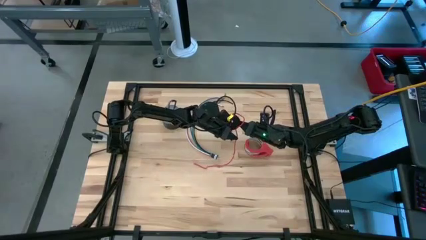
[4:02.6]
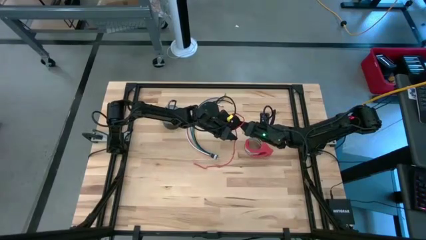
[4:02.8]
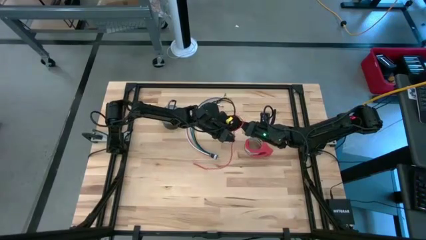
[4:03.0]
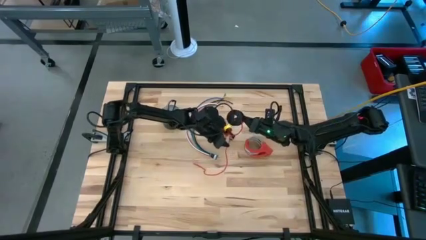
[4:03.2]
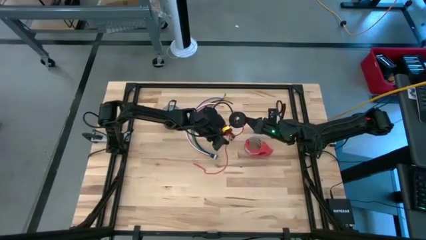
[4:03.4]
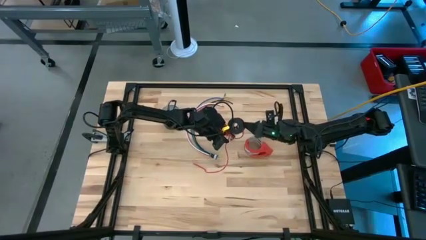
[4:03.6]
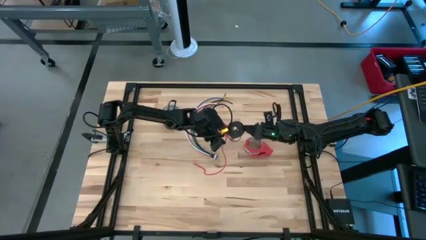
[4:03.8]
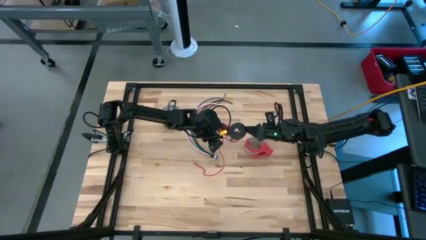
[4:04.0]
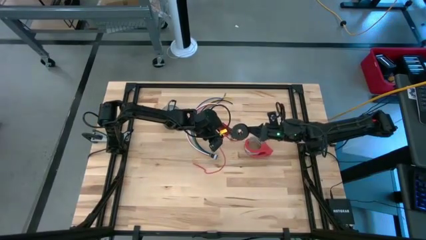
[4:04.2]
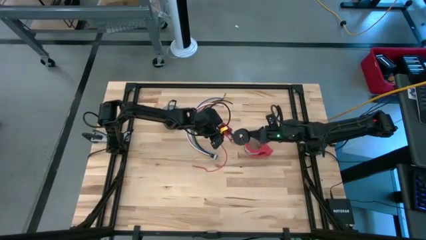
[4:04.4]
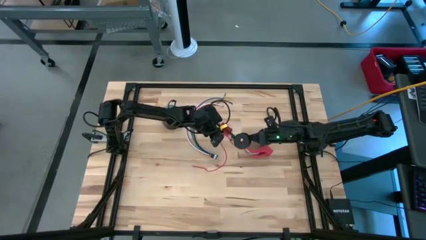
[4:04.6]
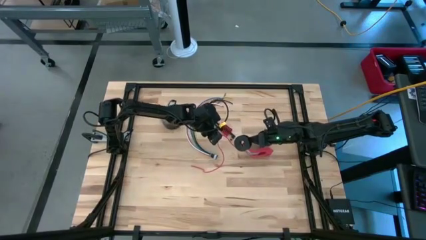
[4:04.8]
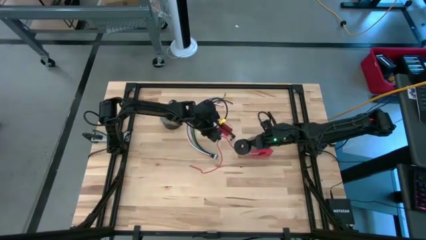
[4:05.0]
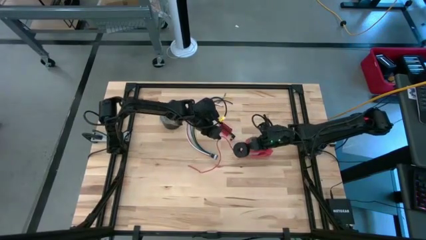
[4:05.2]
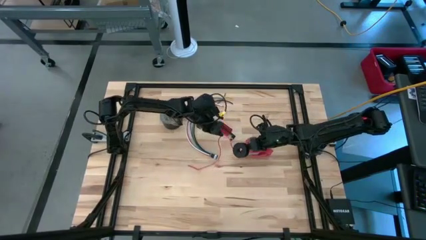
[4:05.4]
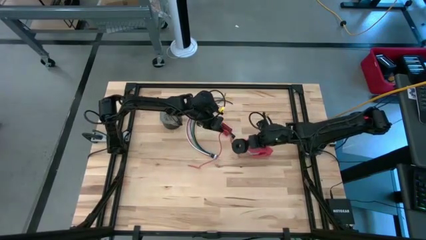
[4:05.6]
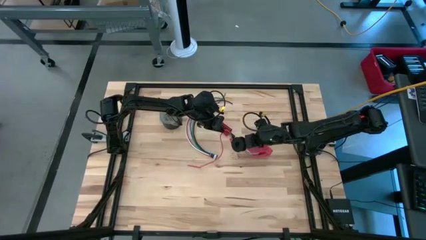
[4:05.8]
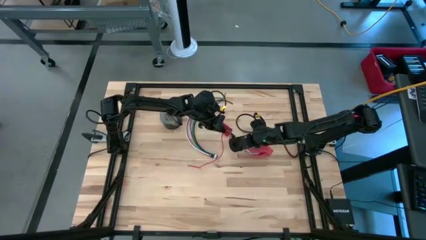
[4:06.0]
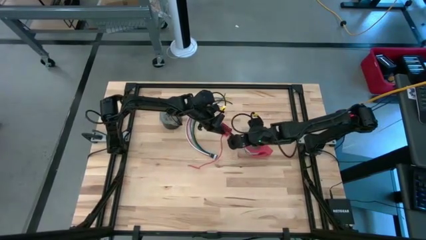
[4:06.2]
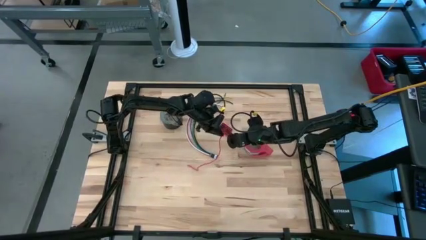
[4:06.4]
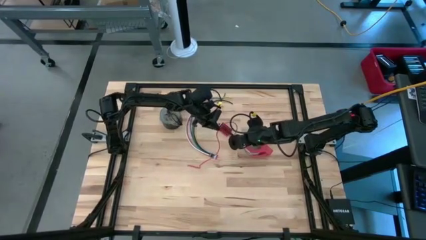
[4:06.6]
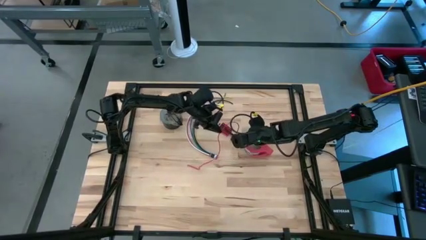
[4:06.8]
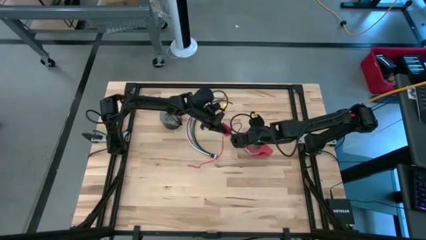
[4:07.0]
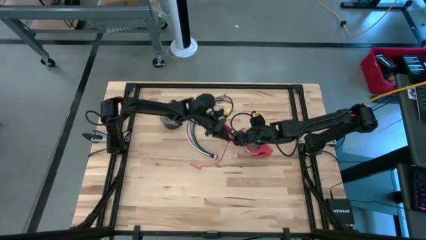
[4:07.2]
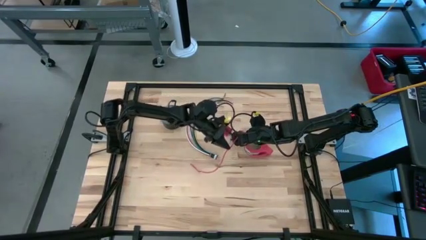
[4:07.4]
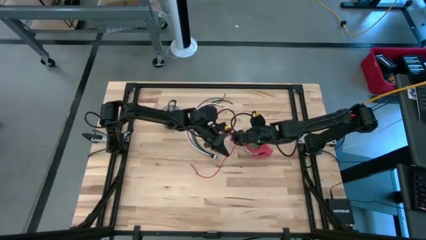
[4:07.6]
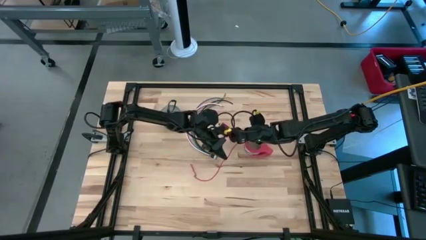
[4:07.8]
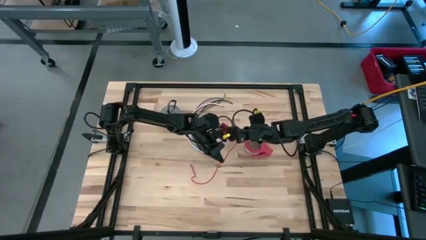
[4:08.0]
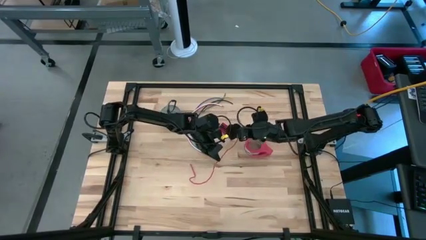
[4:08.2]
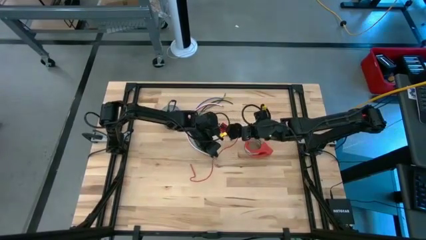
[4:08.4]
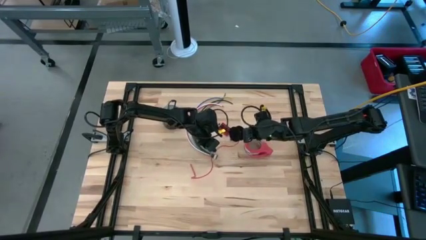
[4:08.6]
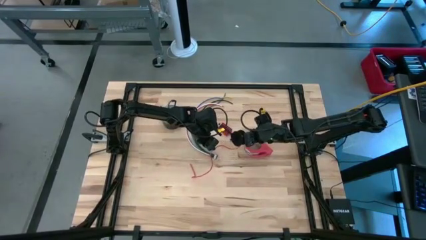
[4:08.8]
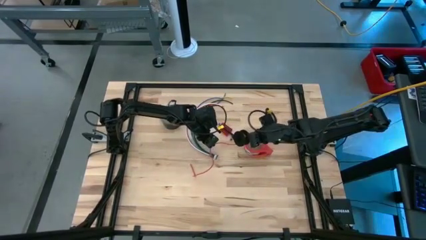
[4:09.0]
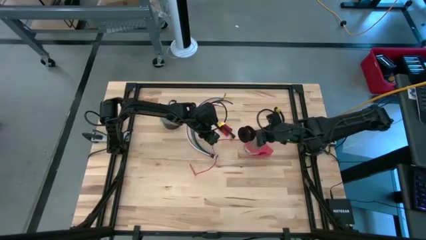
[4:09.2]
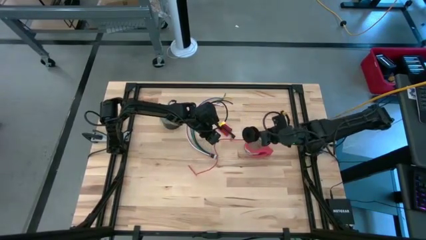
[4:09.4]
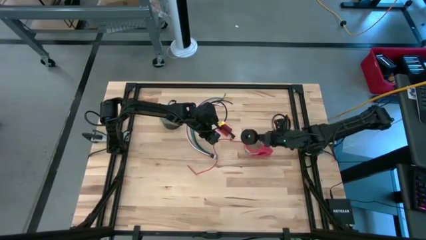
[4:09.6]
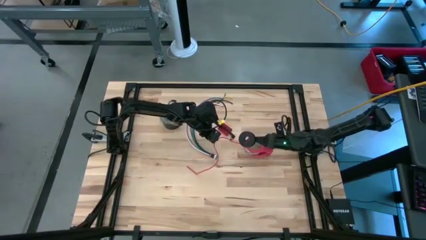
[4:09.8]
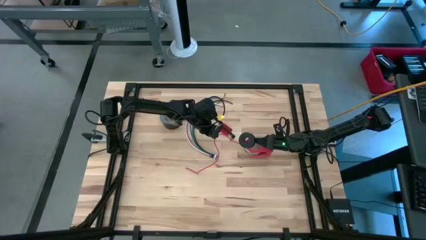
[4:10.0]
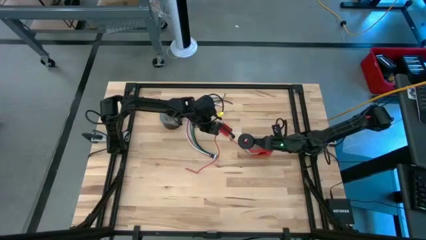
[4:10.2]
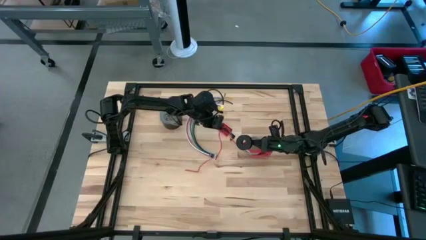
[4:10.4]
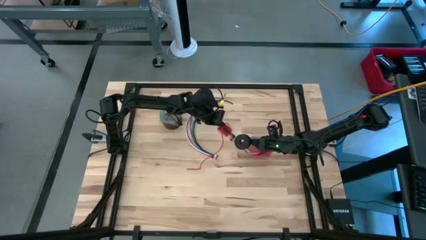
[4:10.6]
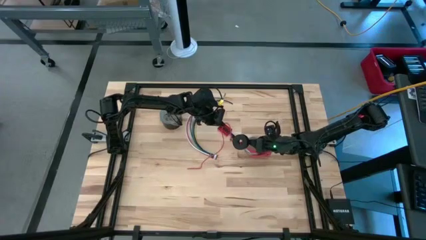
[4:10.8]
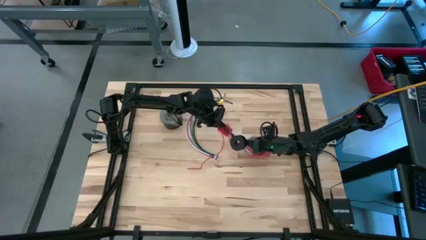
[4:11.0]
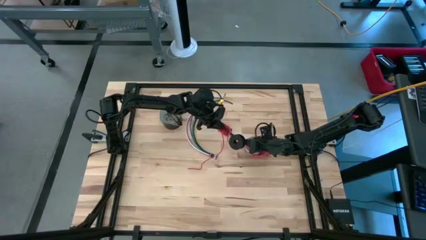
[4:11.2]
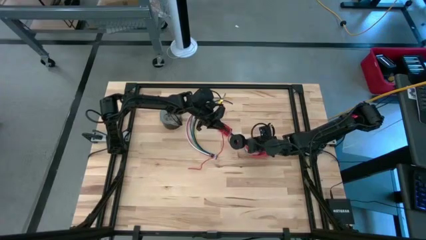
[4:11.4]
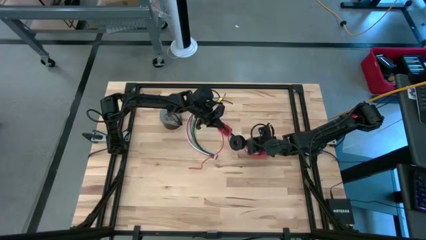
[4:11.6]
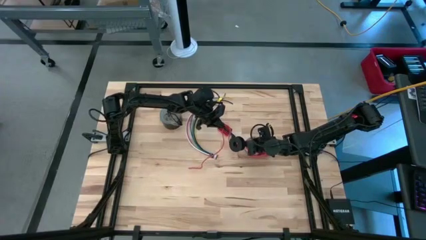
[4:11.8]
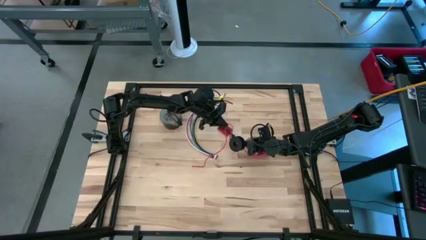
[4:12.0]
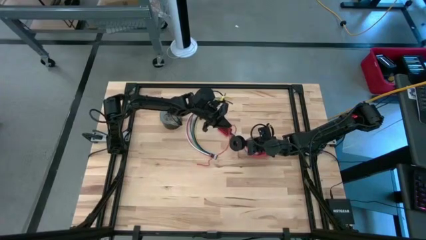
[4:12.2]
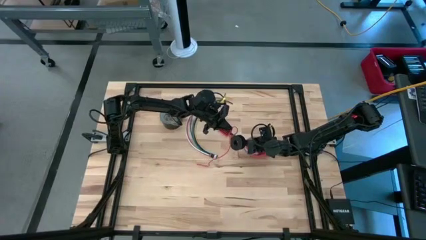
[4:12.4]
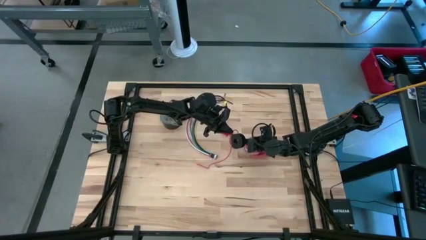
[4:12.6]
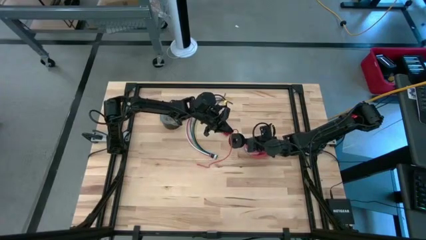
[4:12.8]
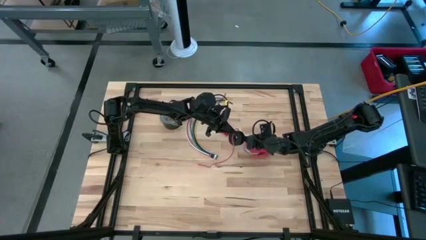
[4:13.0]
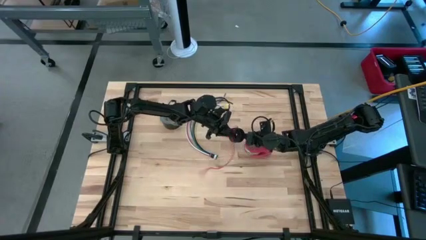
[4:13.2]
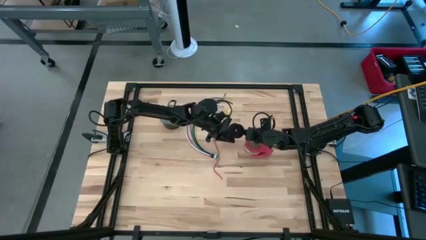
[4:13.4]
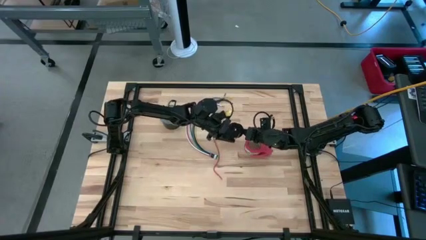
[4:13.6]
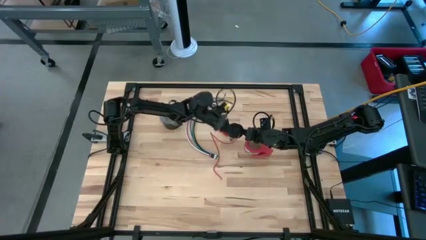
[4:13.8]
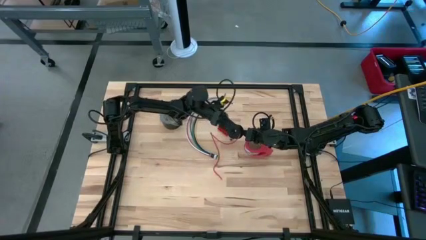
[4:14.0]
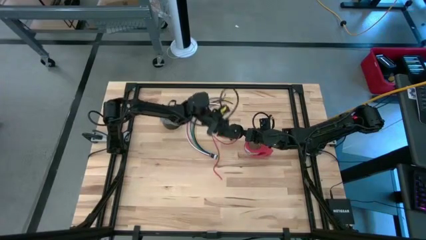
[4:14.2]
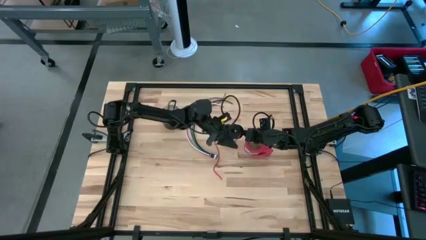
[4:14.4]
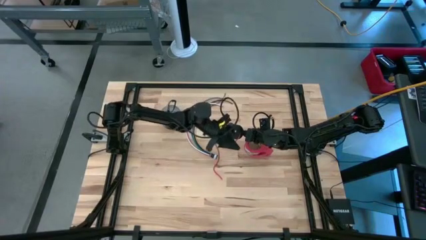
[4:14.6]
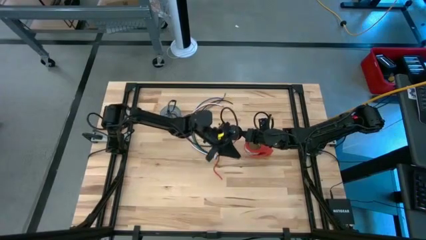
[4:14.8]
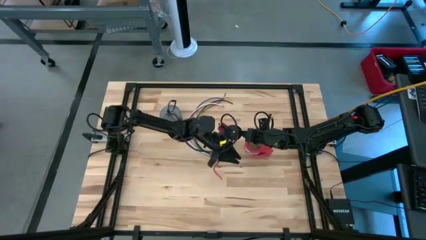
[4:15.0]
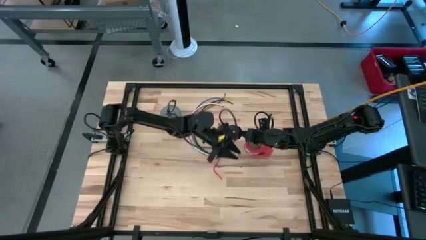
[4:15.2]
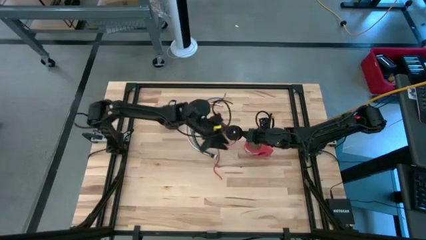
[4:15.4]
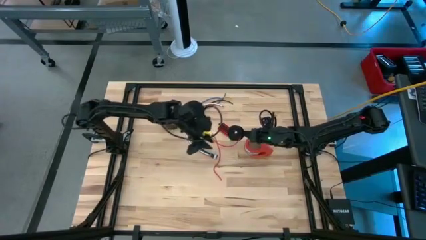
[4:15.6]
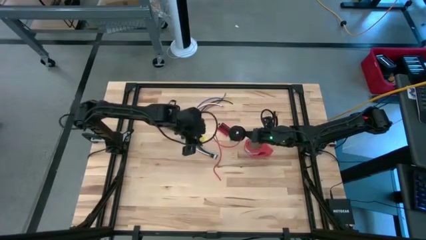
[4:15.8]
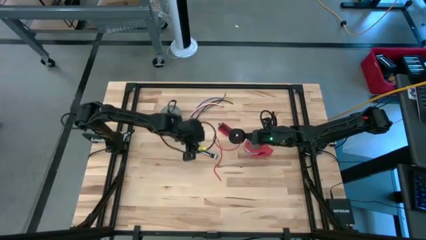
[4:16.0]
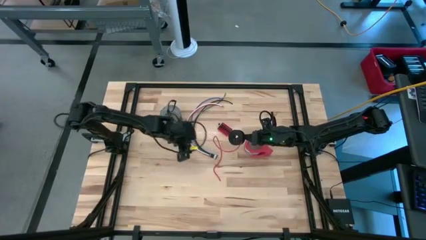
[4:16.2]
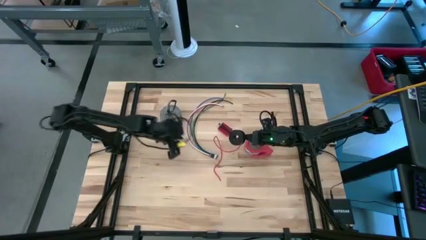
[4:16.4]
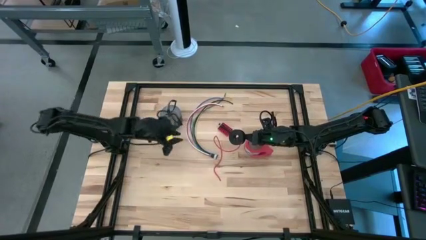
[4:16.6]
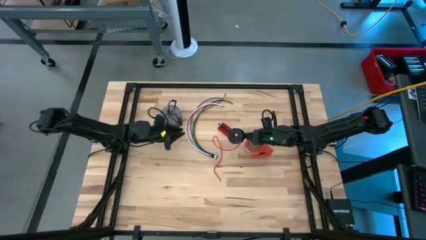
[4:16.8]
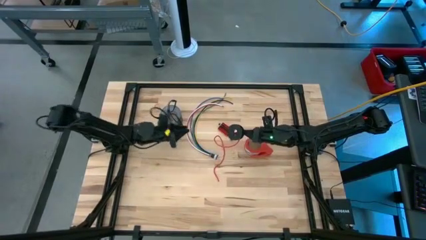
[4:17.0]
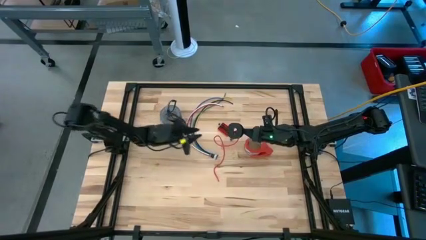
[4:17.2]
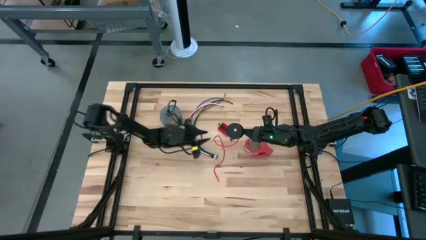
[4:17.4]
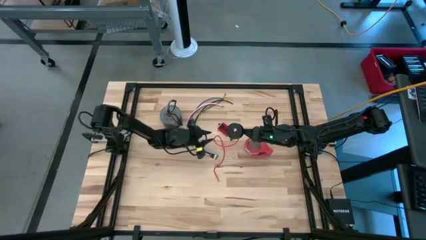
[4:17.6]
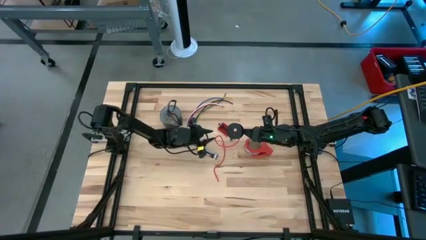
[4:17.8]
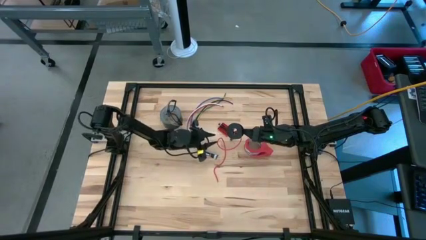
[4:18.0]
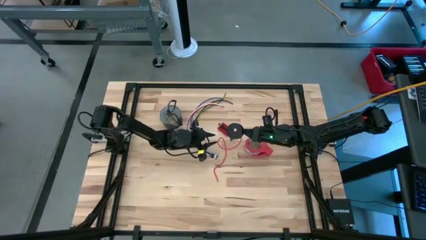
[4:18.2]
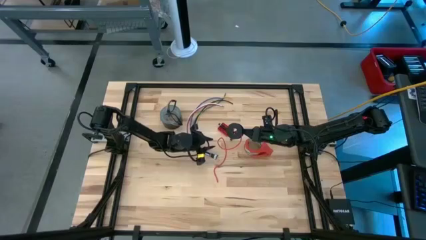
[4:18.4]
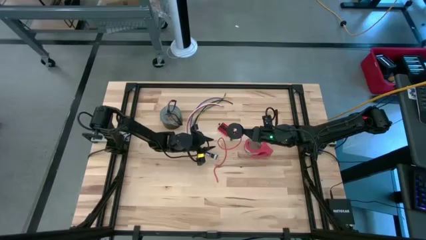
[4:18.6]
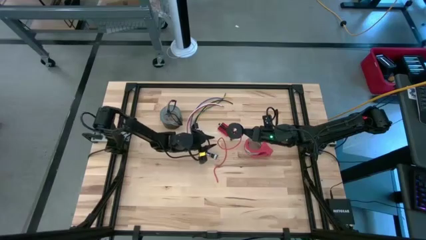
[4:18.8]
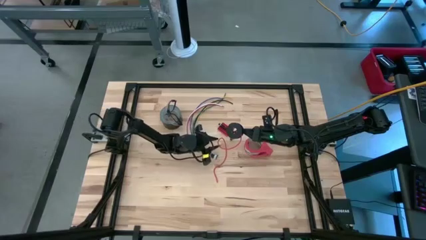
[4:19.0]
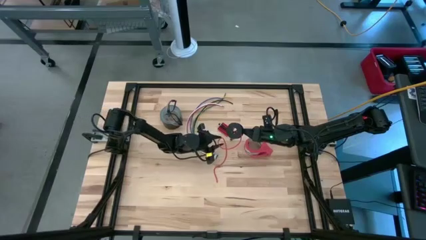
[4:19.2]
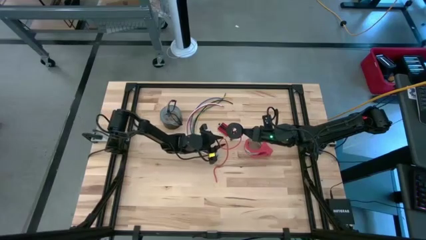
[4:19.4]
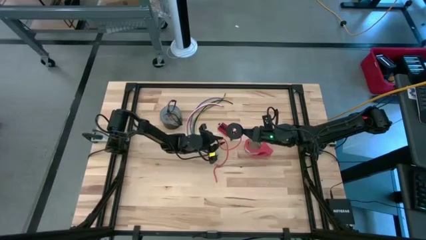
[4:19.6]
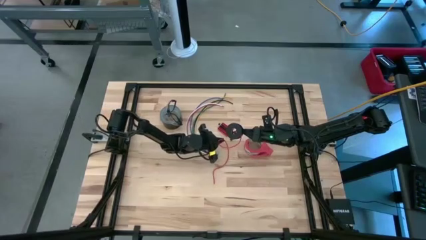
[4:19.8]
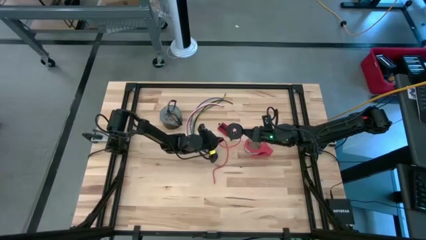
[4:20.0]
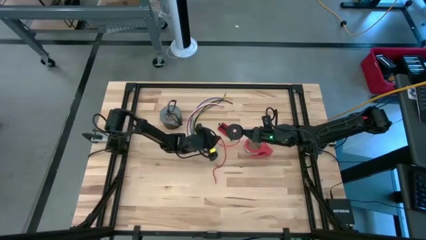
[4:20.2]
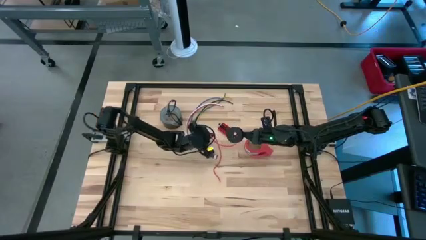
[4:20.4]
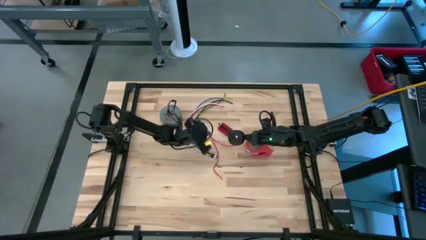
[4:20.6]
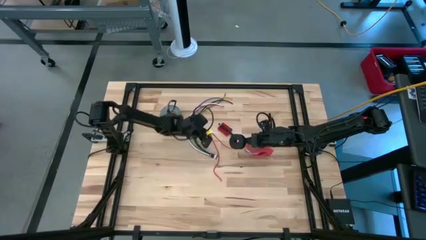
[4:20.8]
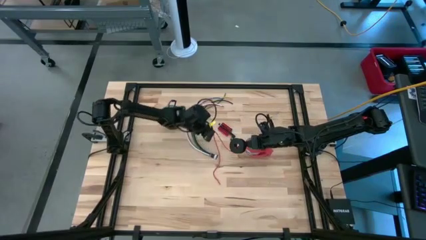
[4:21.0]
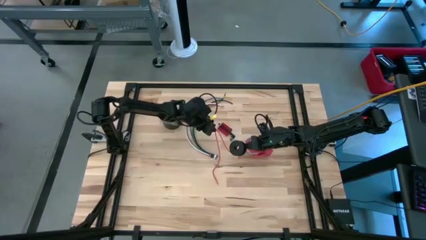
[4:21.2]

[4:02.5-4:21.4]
Task: Coil cords
Coil the red wire onto the spool
